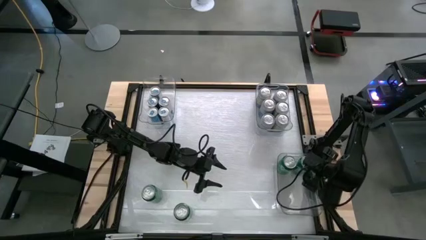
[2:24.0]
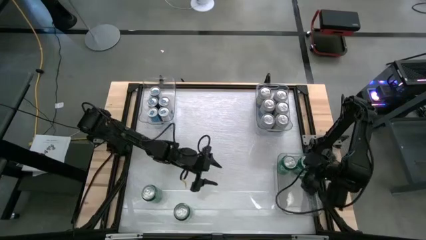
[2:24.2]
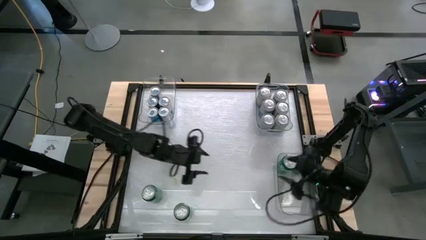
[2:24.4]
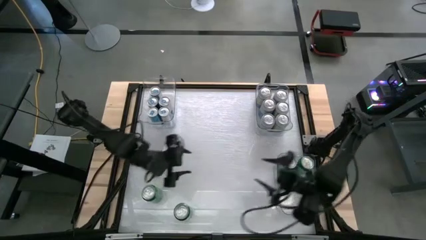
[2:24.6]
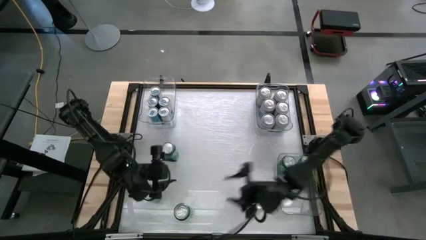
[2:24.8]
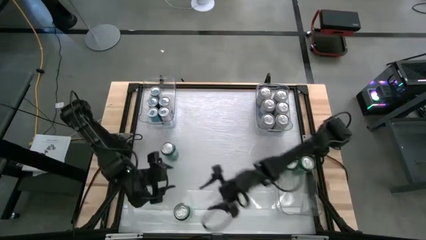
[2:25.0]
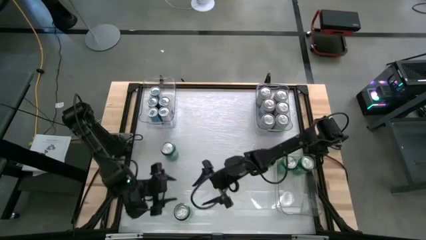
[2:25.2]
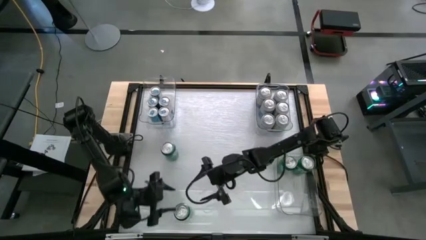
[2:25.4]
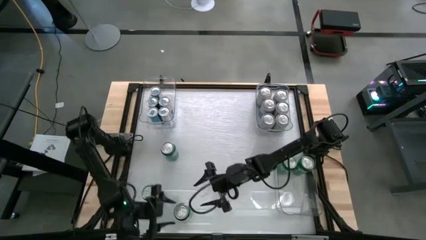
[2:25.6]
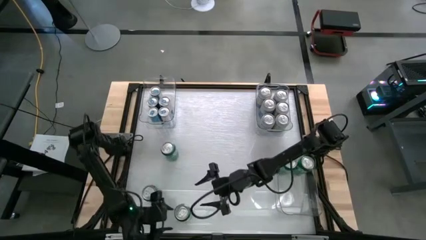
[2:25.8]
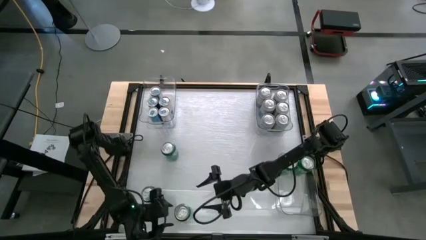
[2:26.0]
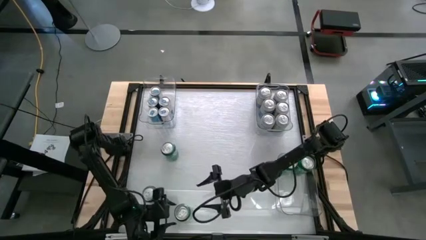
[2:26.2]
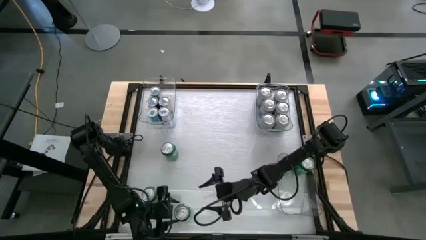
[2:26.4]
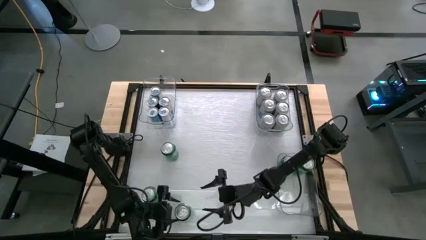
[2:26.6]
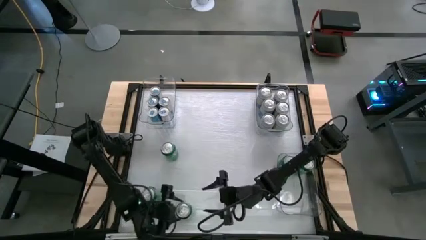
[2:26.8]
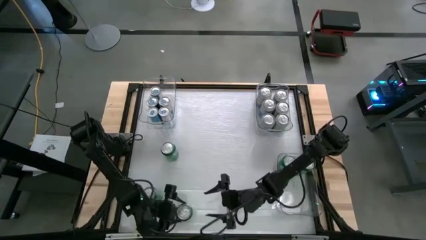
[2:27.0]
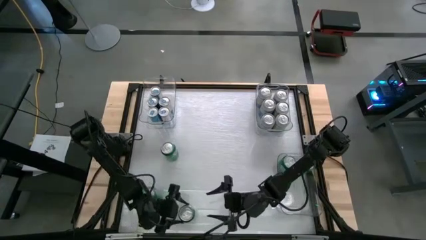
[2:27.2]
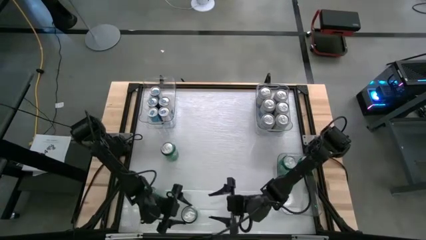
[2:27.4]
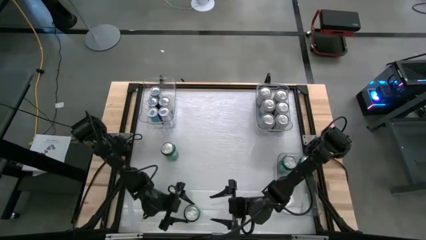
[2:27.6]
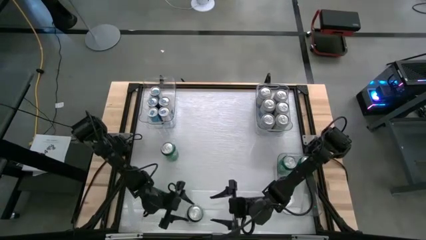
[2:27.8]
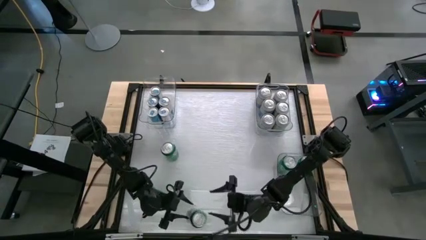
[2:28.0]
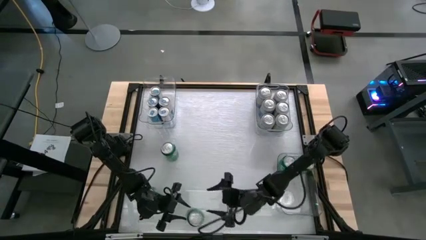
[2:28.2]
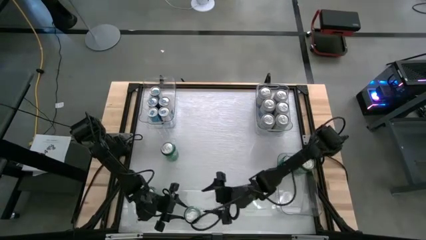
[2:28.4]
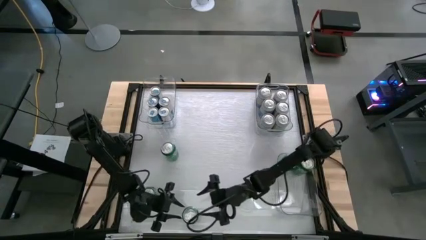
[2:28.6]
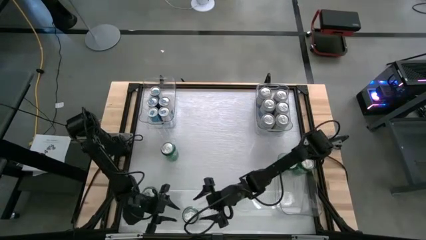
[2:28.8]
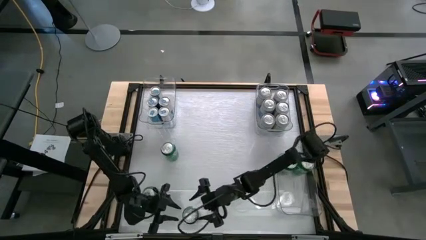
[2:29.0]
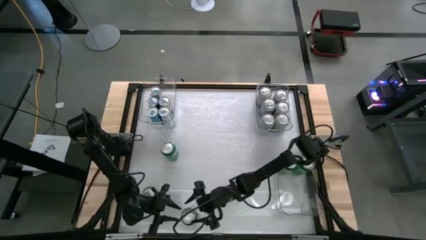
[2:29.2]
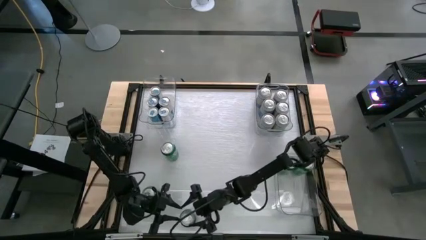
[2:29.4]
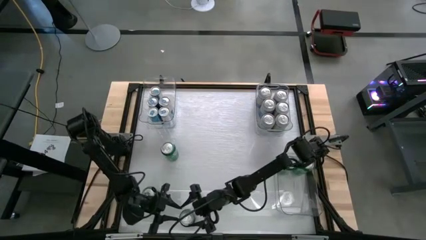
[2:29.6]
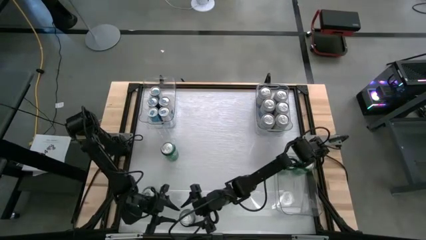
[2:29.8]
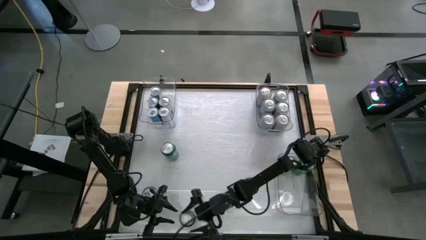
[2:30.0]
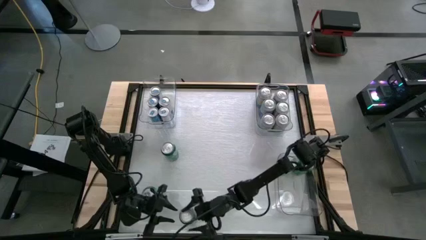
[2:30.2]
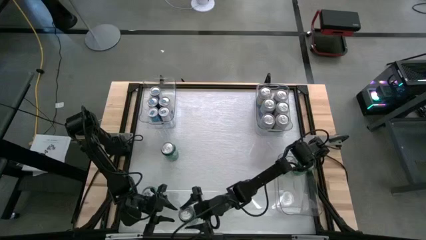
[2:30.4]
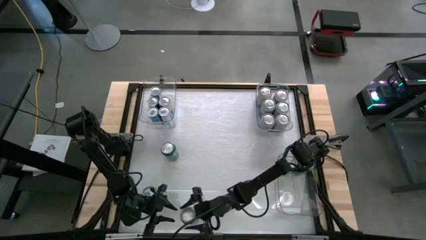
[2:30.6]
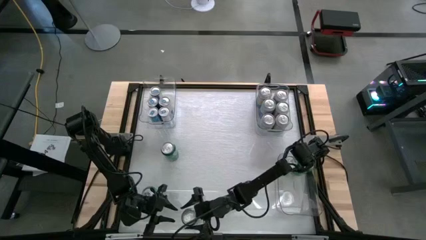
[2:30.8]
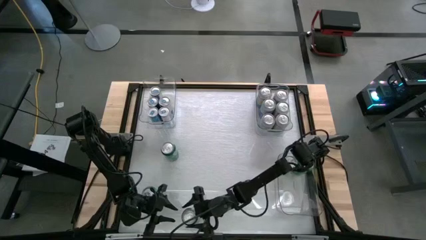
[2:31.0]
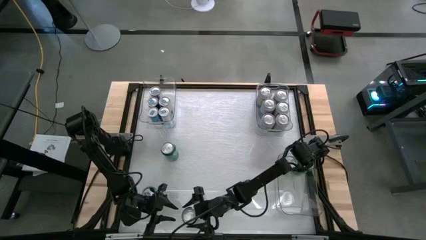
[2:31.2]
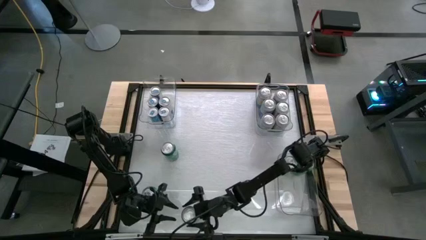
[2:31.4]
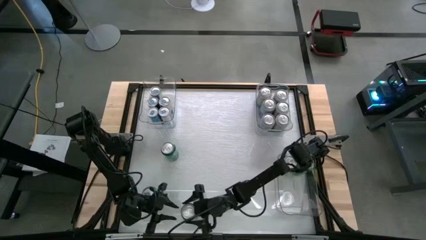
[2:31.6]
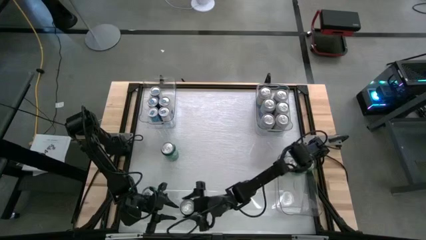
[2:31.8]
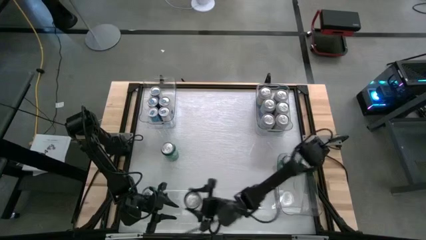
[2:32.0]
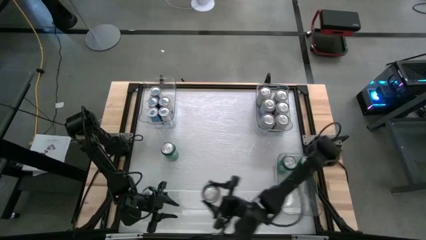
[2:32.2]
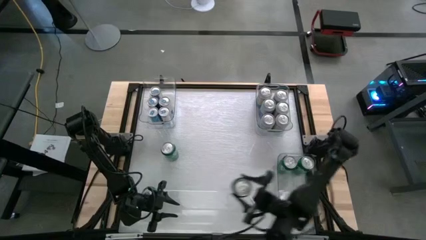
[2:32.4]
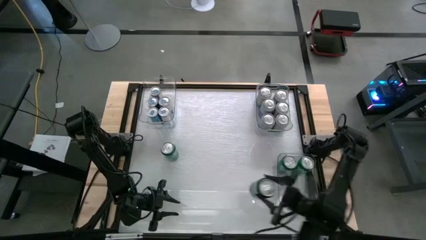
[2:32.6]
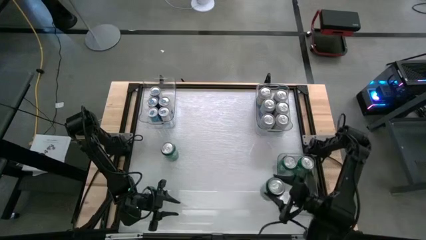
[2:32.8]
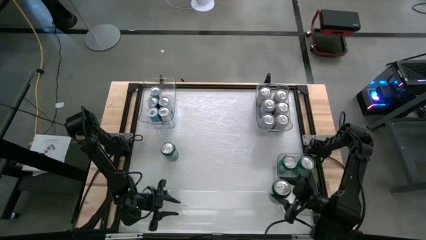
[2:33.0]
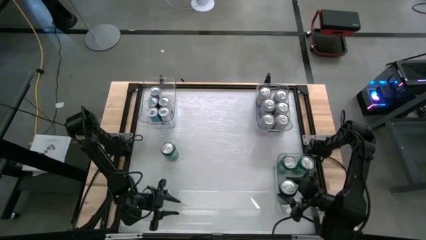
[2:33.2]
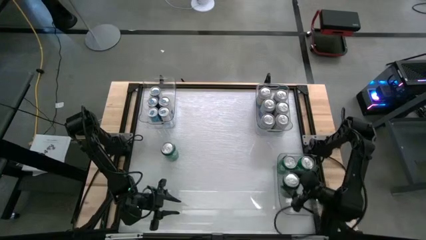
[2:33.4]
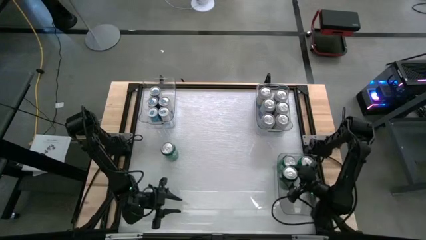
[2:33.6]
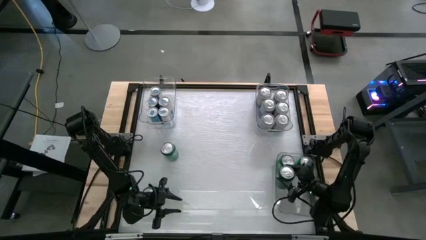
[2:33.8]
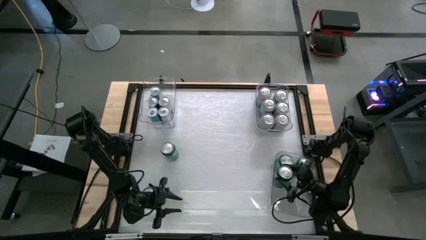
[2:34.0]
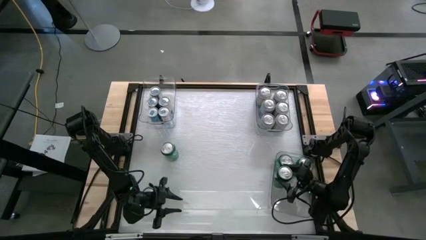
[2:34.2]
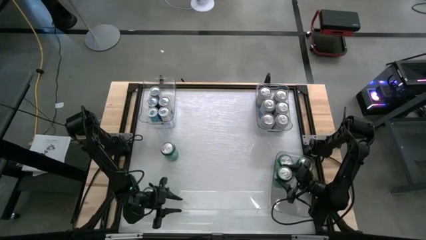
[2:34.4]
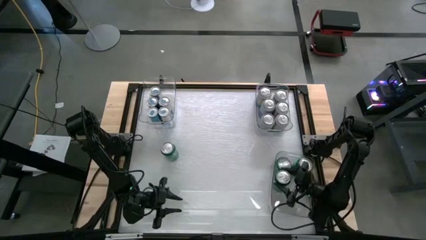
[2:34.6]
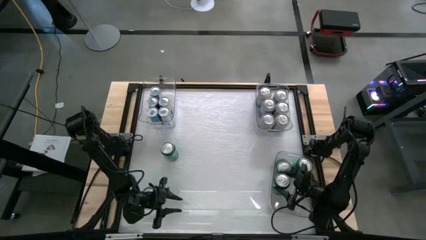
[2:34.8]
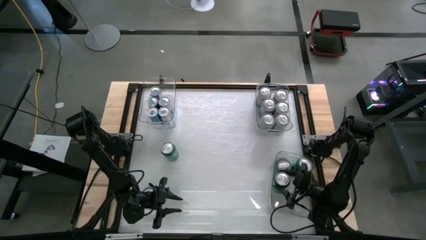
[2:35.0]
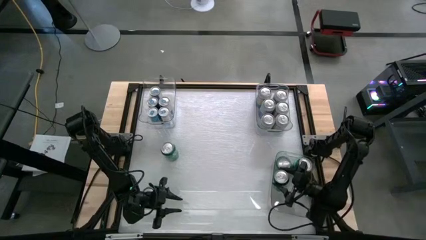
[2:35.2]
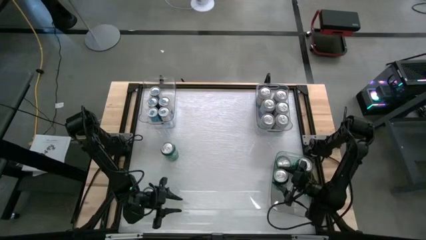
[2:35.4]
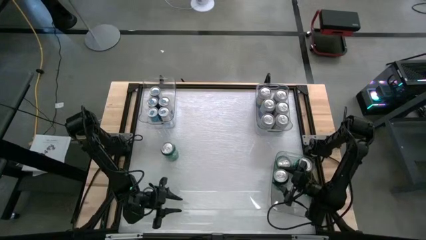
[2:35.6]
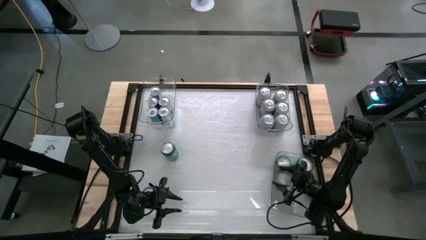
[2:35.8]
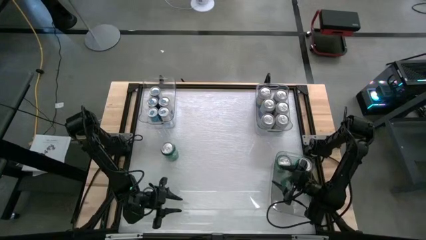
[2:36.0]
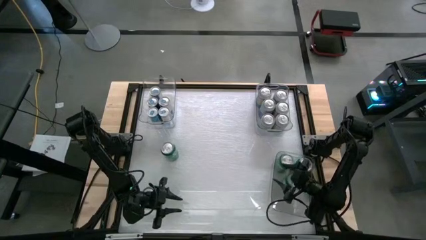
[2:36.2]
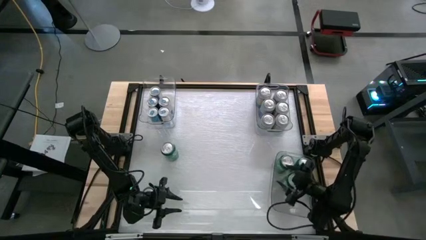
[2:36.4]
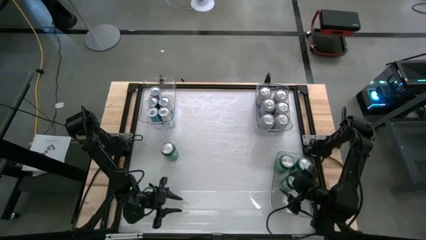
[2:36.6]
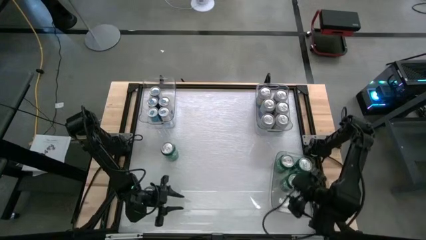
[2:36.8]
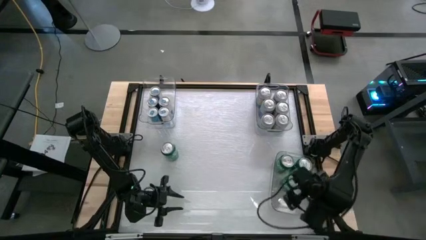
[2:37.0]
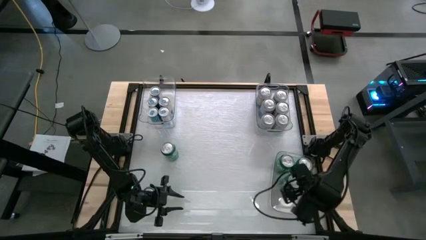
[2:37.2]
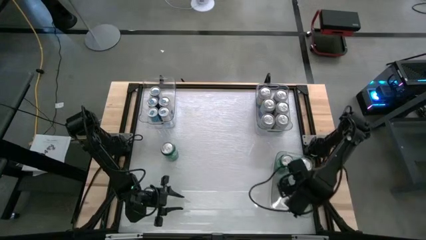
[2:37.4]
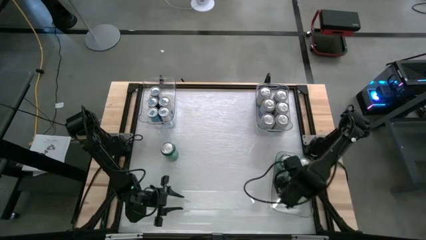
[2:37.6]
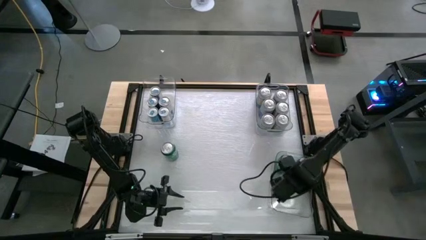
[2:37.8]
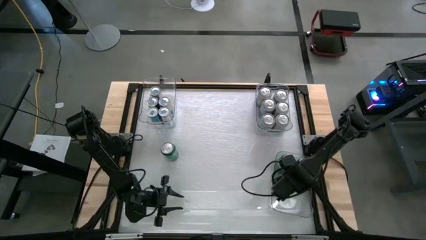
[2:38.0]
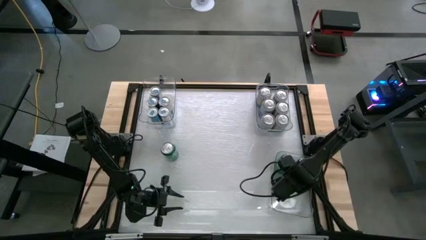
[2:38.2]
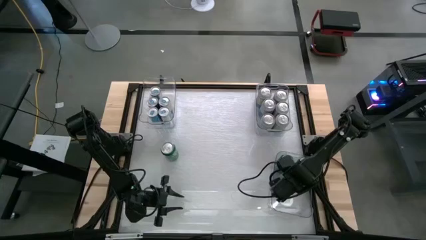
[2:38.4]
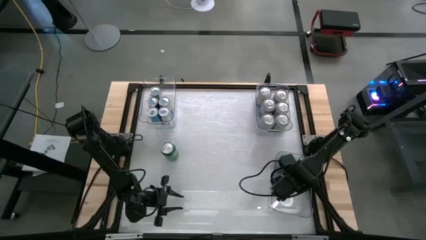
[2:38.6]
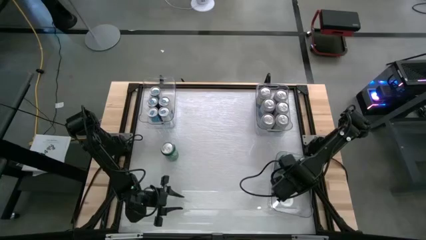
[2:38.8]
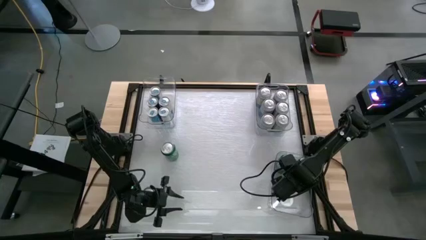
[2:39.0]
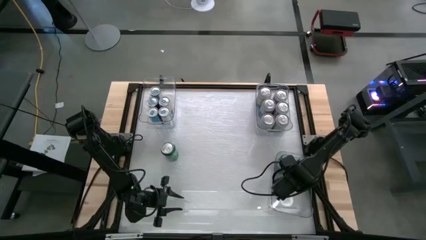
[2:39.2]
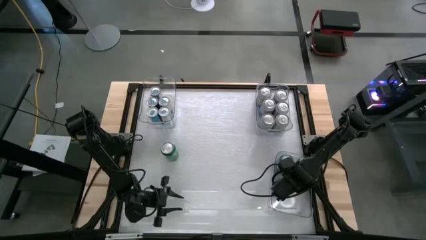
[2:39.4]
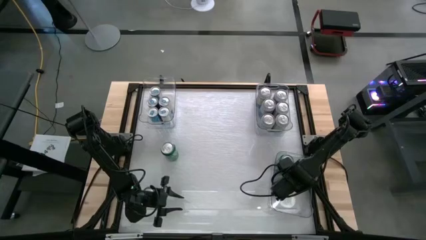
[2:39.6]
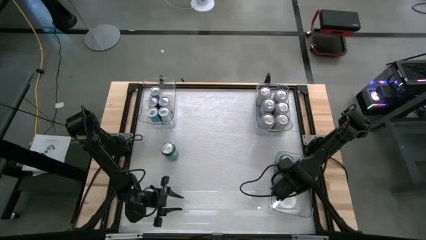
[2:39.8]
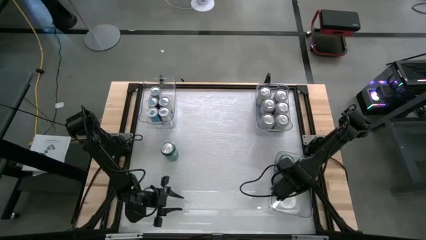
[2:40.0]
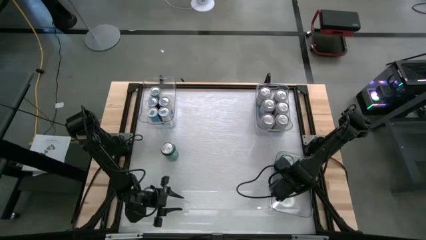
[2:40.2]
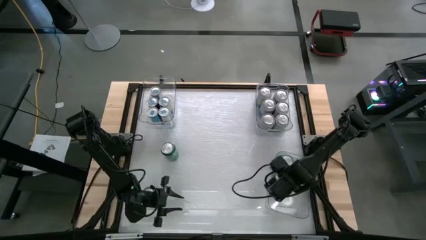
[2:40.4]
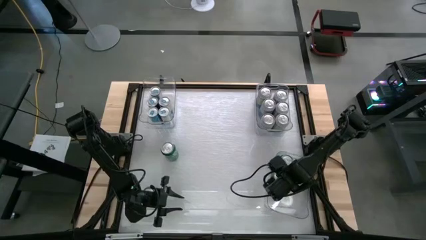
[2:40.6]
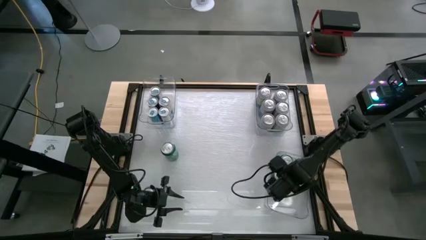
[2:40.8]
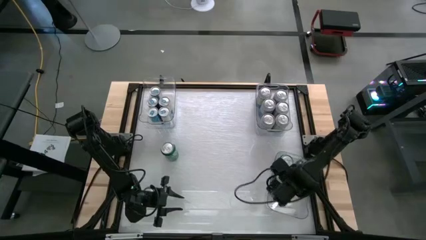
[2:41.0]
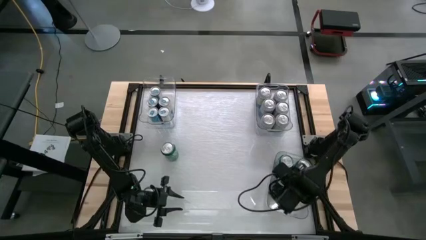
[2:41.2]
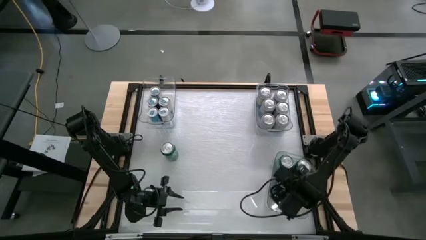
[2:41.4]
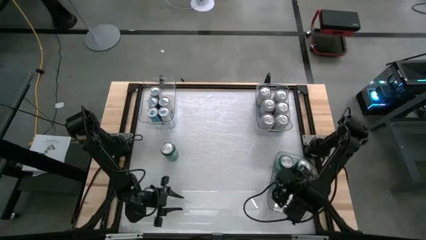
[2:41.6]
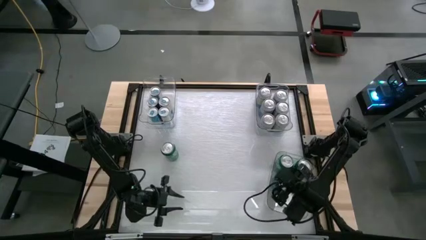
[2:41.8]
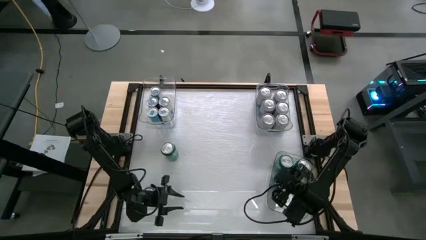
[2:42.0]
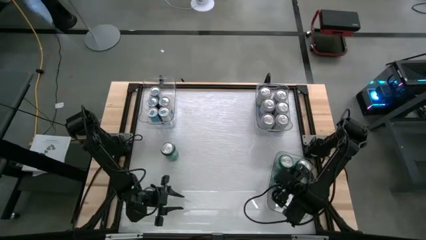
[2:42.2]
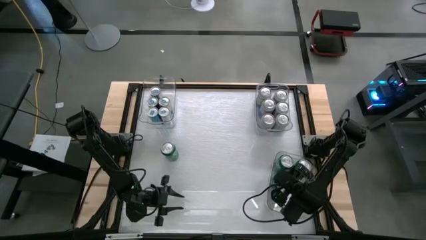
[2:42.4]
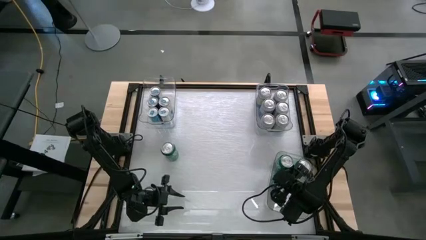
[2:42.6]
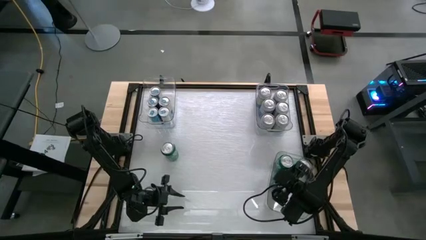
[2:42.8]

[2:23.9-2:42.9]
Task: Sort soda cans
Put the green soda can into the bottom transparent bin
